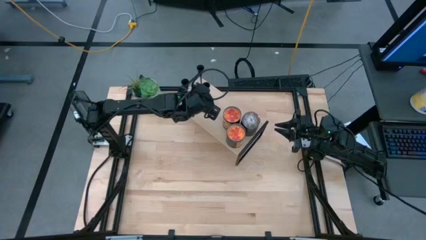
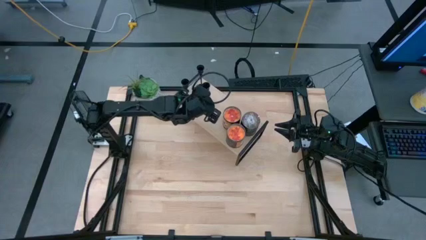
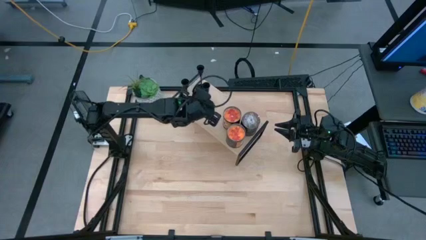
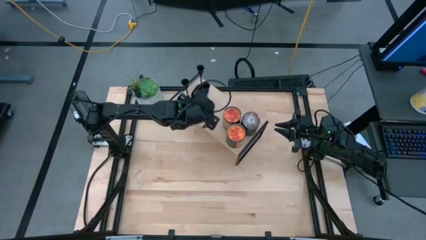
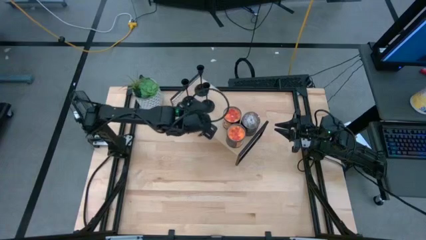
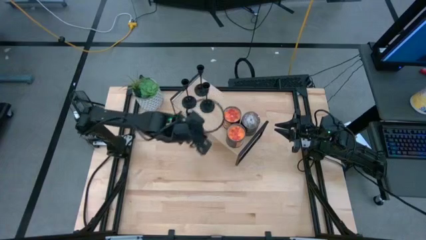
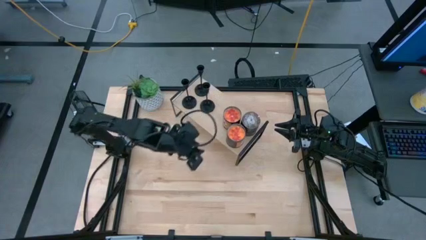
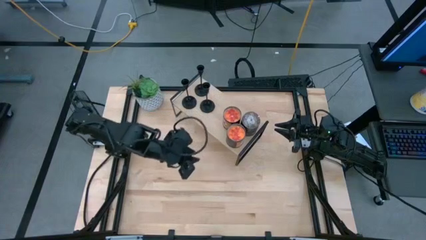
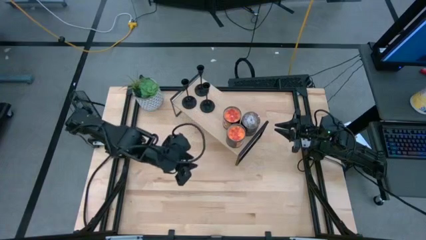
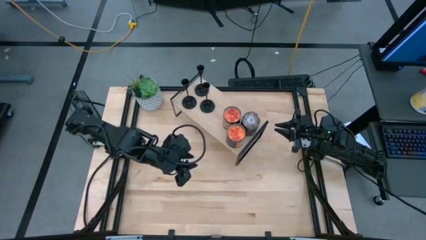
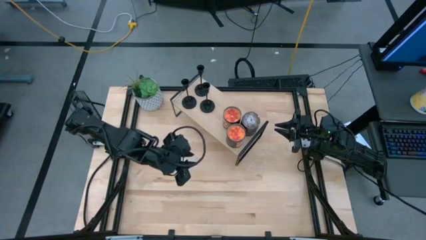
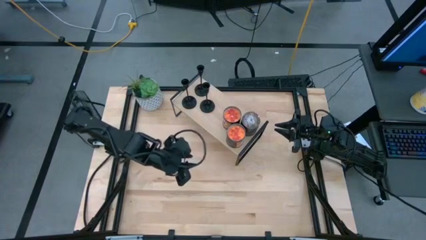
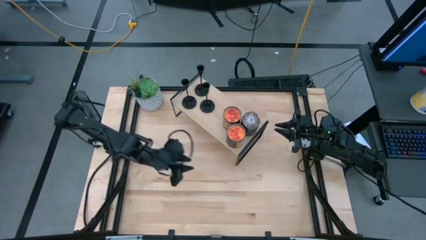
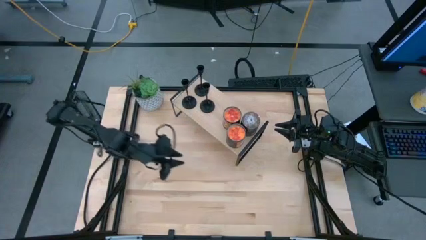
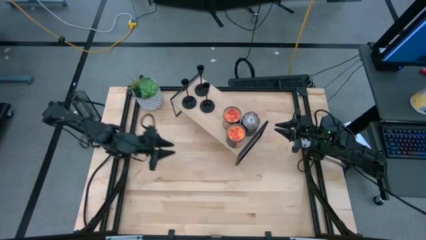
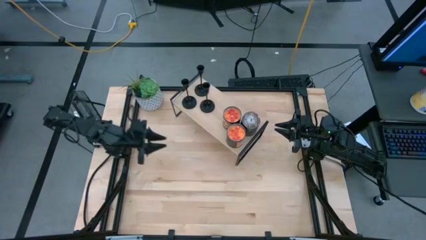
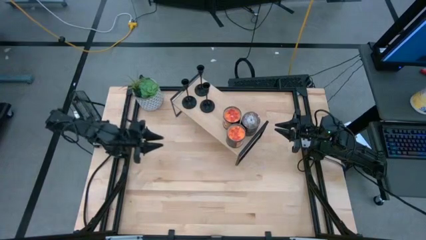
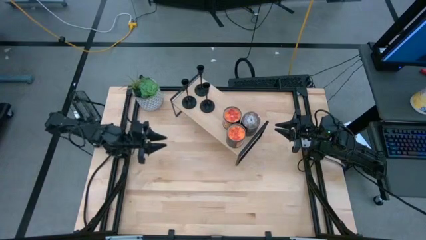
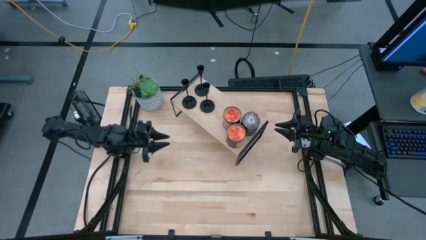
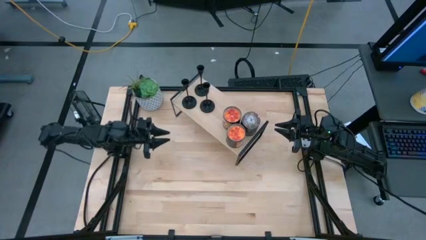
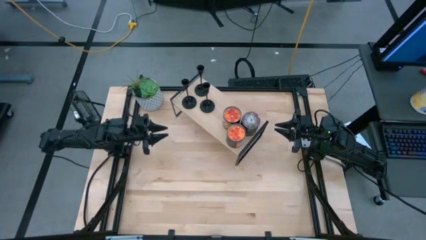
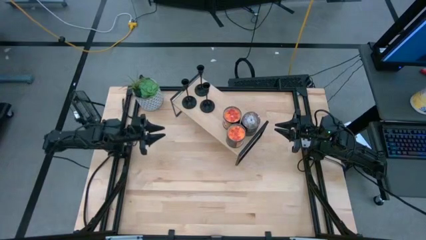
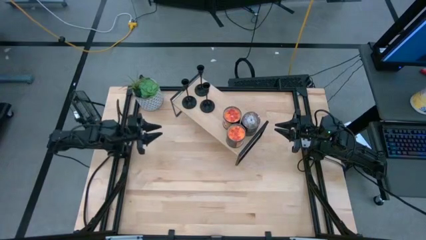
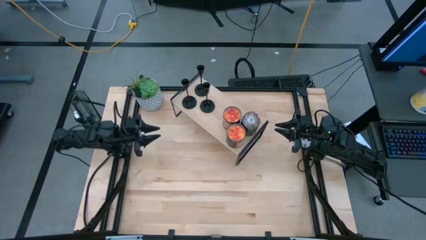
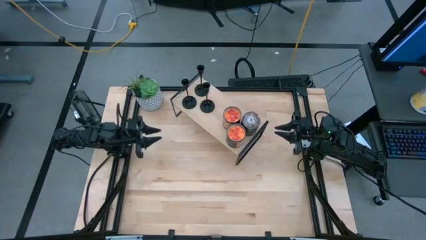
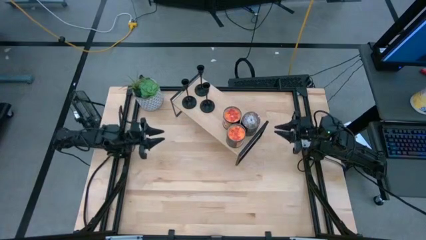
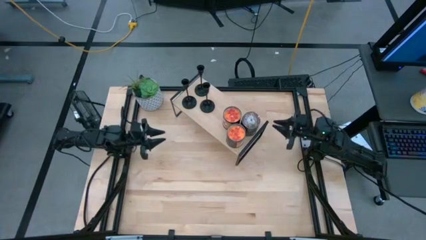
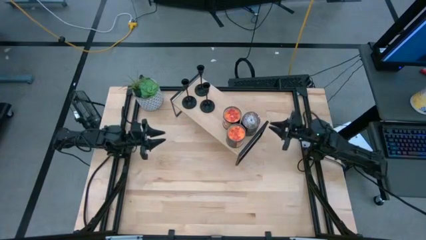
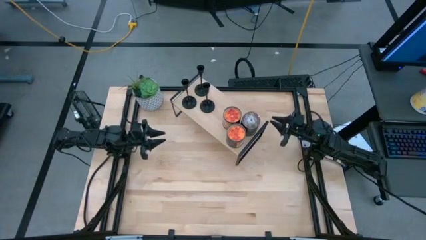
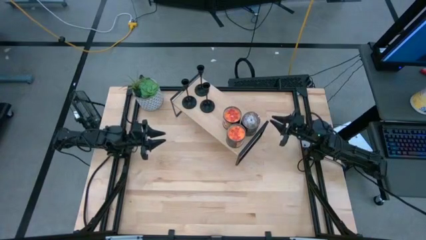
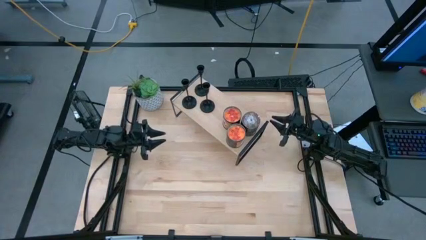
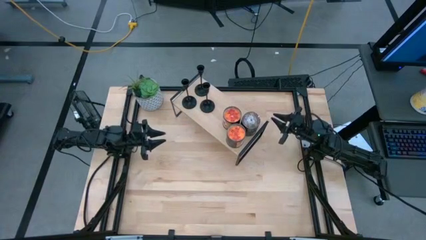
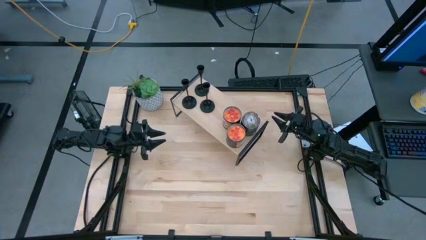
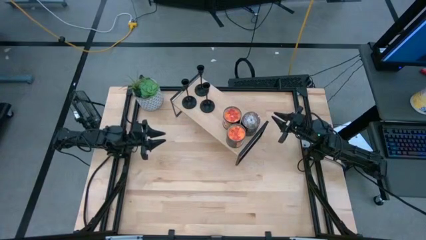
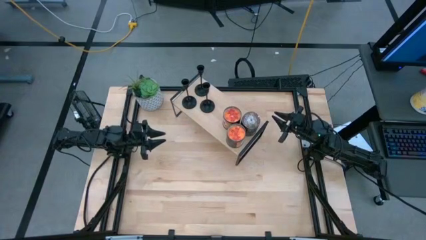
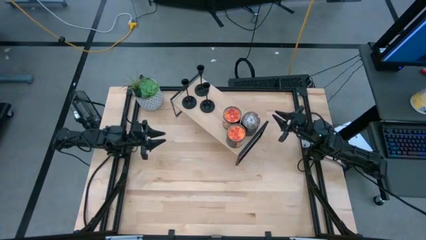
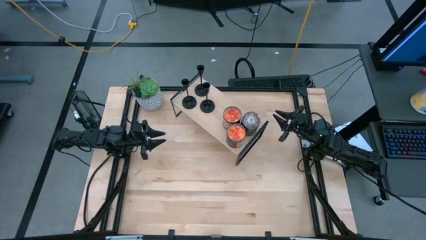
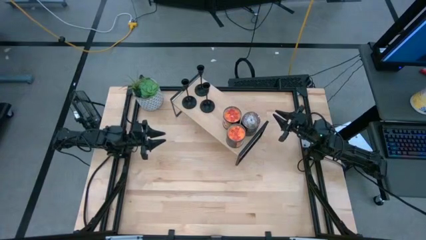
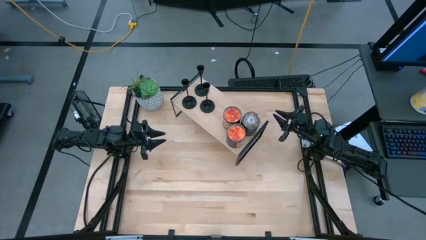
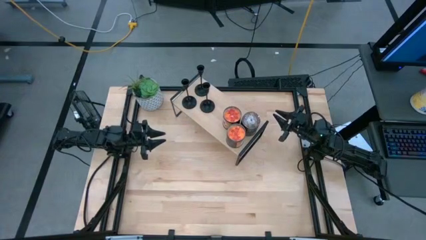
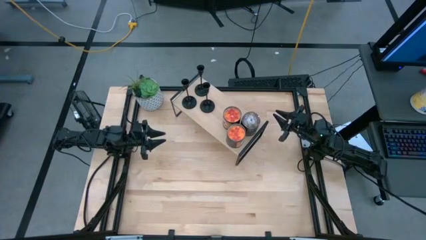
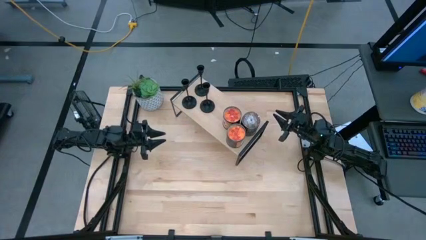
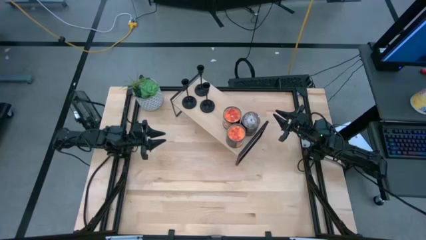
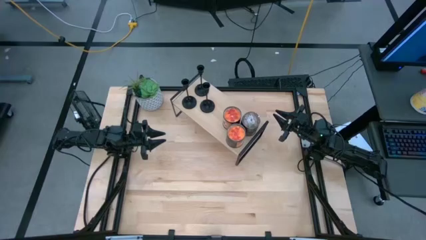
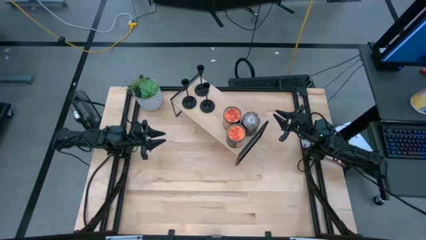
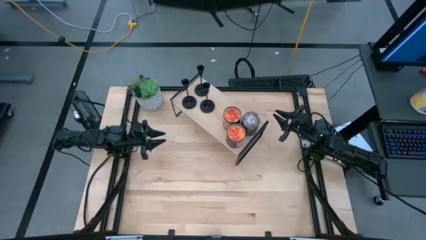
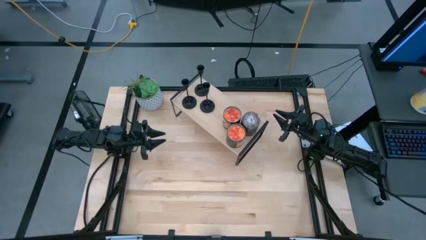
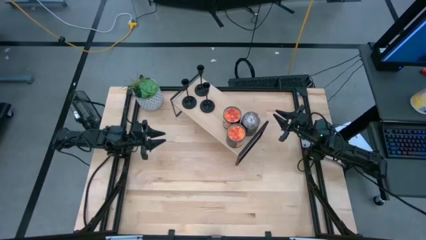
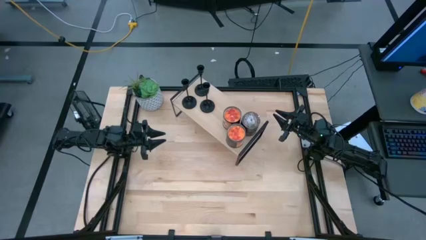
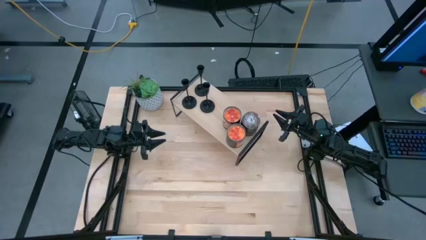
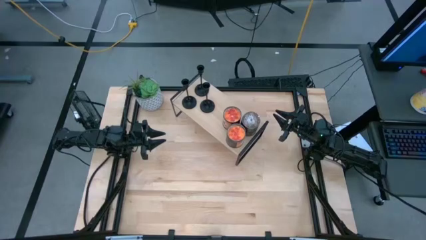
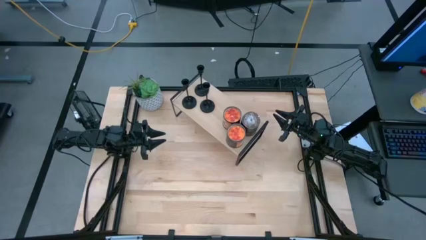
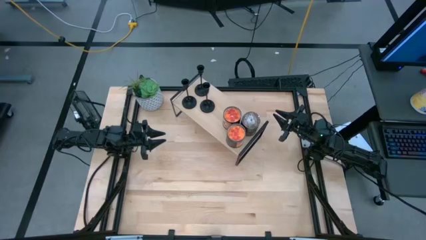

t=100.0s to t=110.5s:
Task: Pick & Place candle stick holders
Return to Home Position

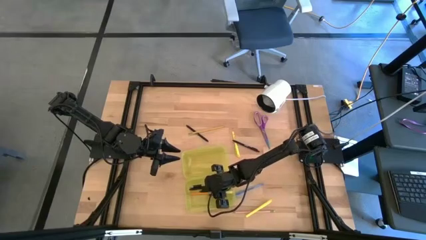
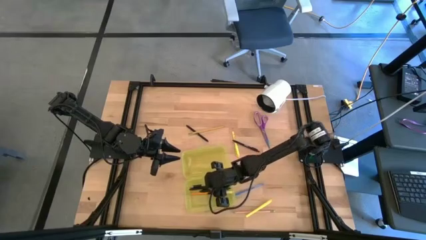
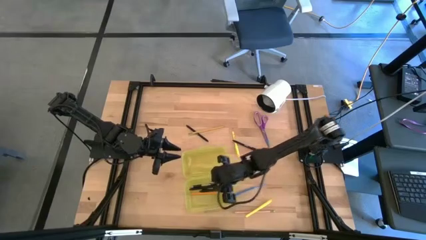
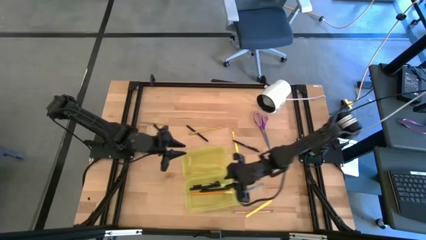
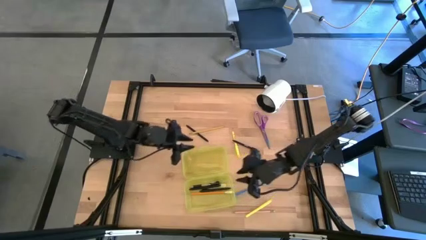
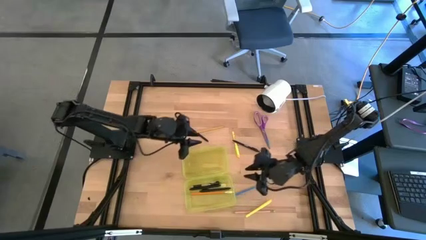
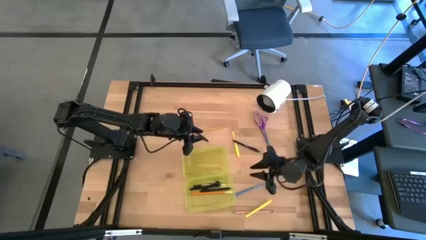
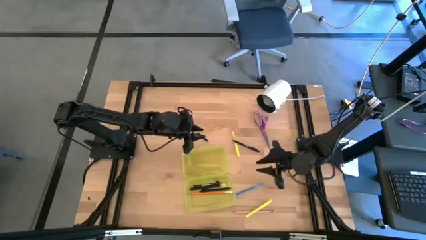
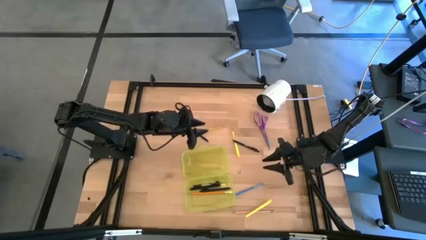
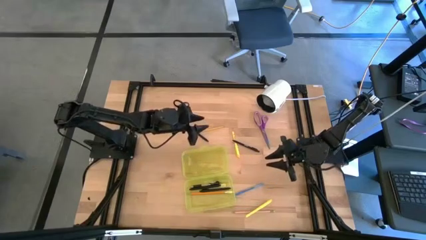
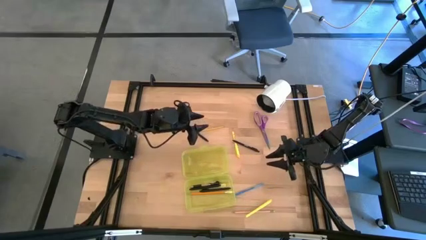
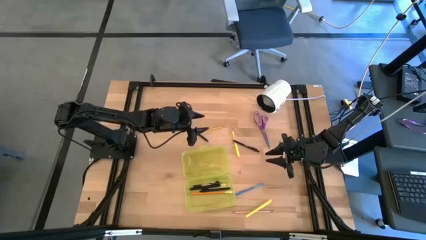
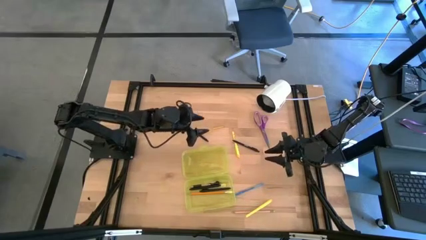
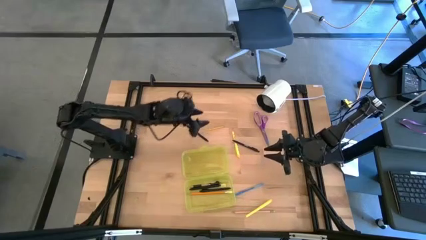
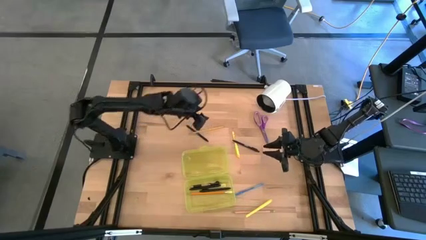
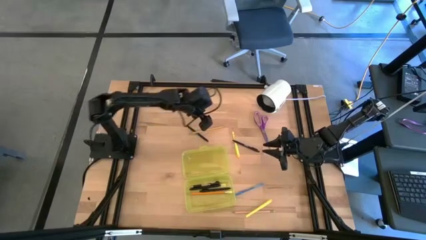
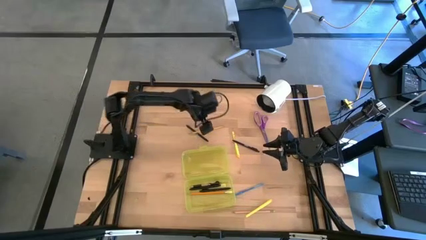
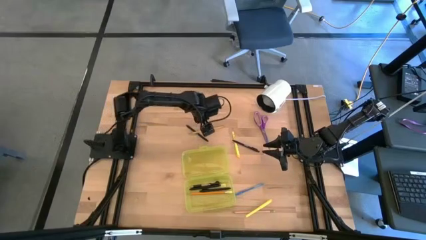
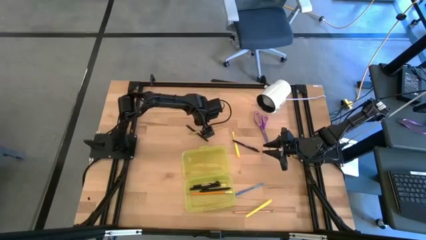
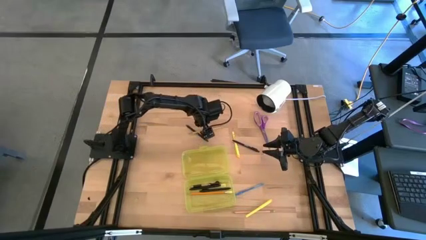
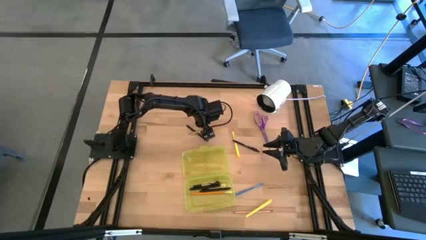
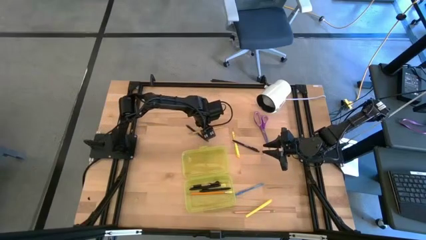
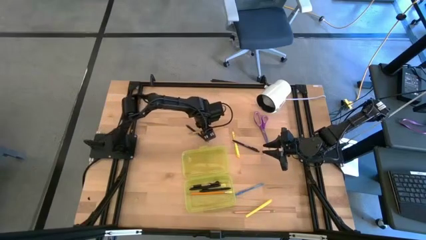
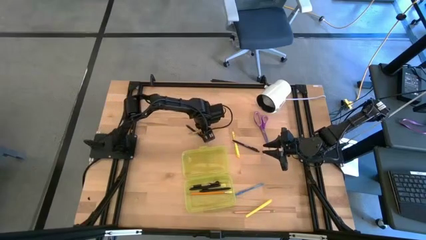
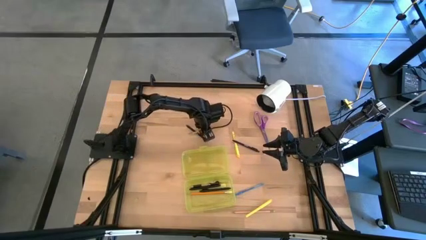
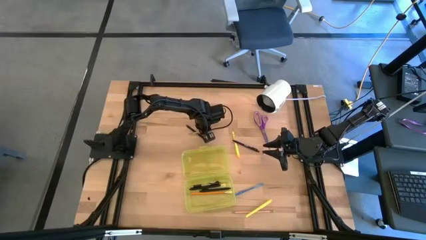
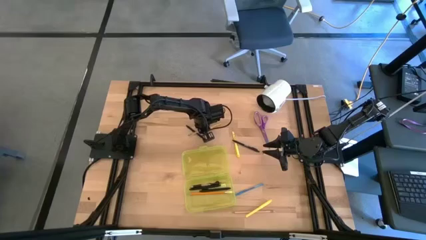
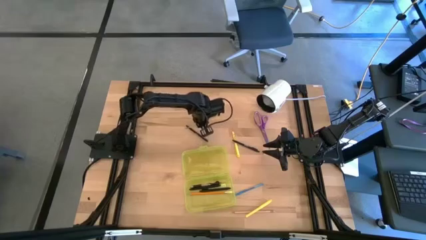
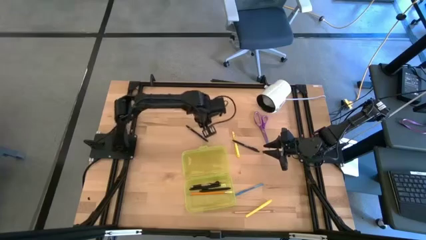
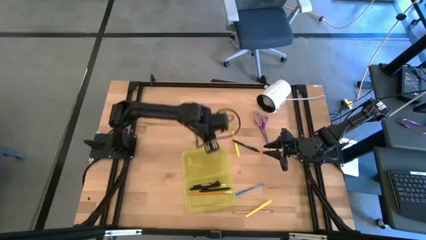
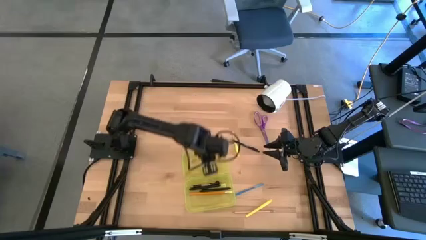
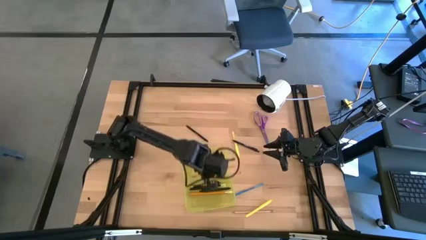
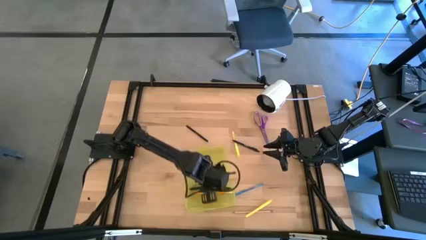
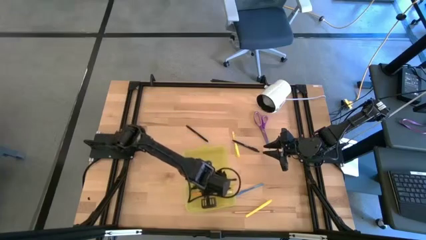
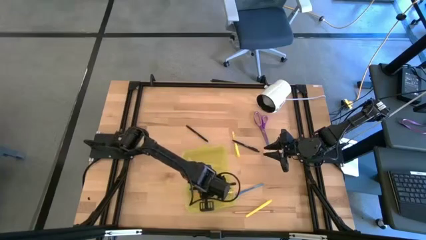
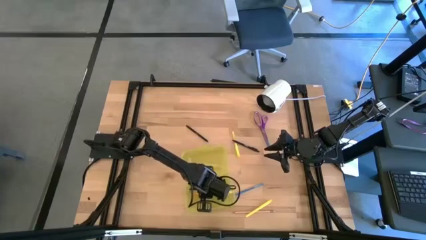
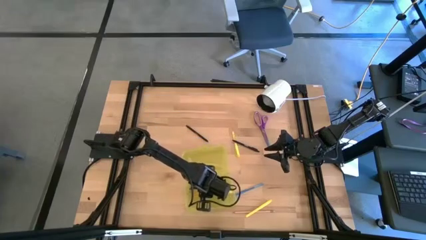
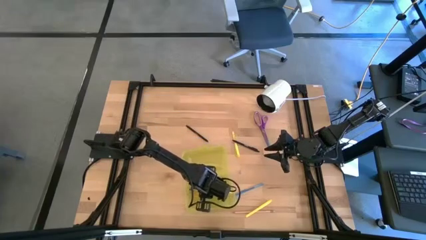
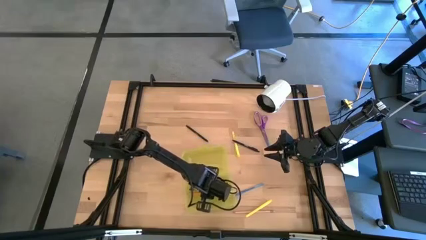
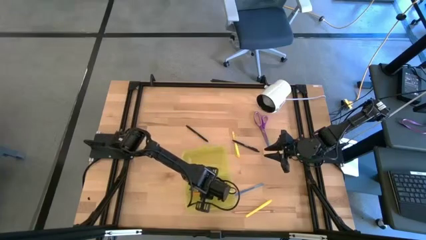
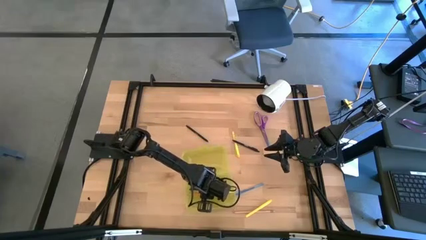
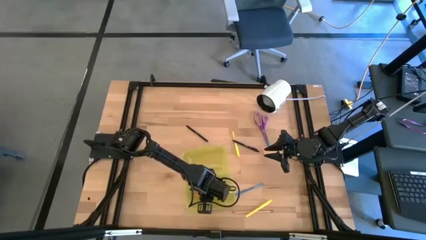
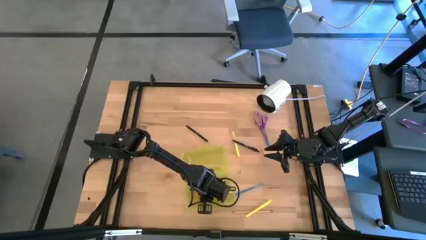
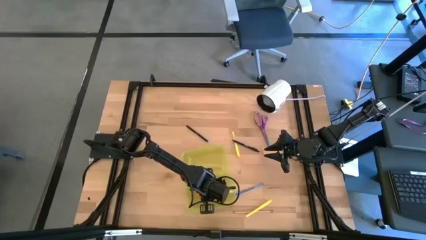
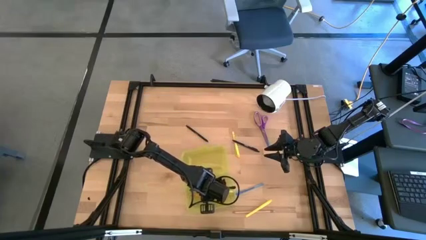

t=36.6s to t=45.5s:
Task: Pick & place school supplies into a supply box
Put the yellow pencil into the yellow supplies box
